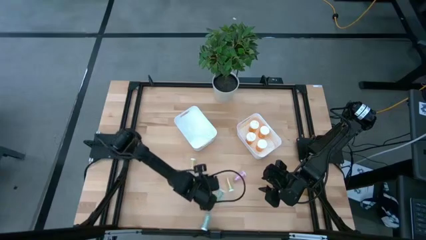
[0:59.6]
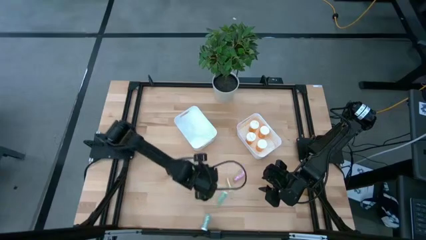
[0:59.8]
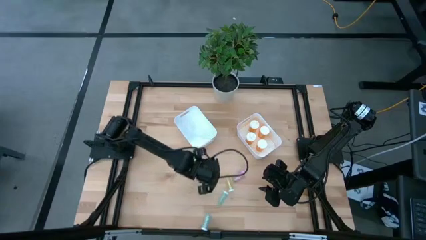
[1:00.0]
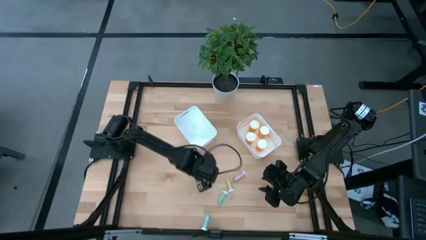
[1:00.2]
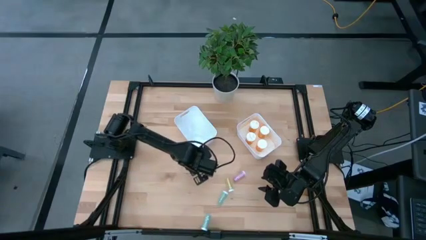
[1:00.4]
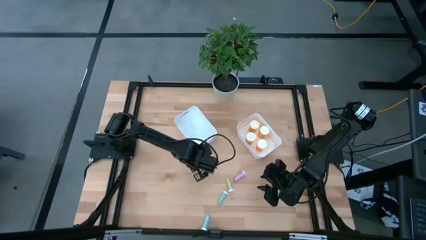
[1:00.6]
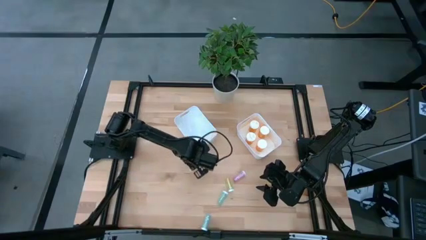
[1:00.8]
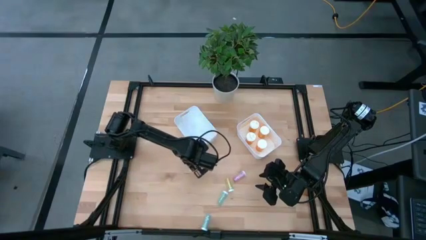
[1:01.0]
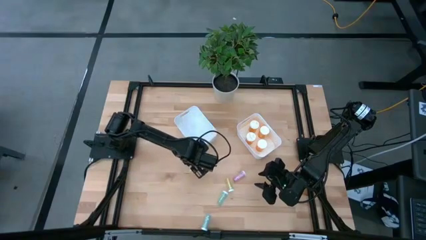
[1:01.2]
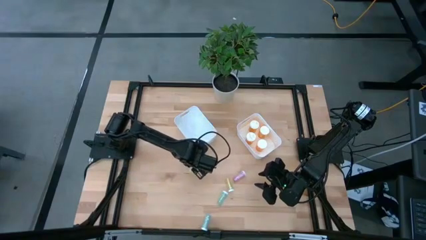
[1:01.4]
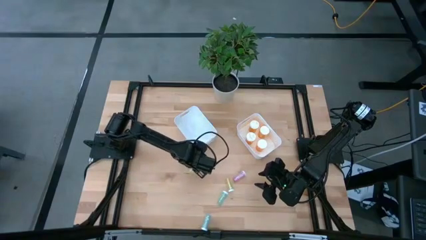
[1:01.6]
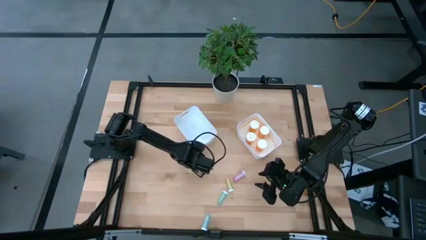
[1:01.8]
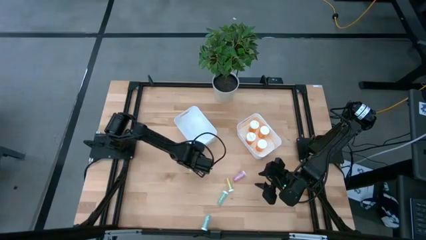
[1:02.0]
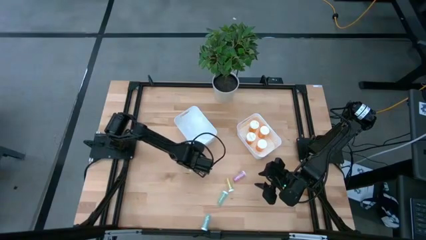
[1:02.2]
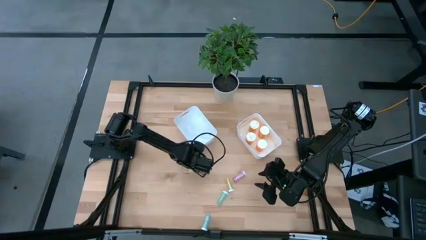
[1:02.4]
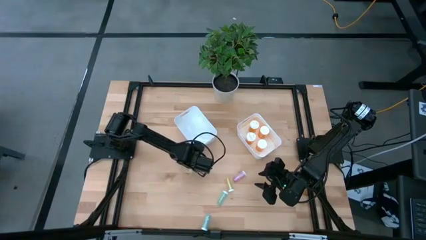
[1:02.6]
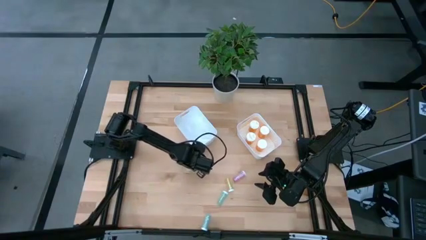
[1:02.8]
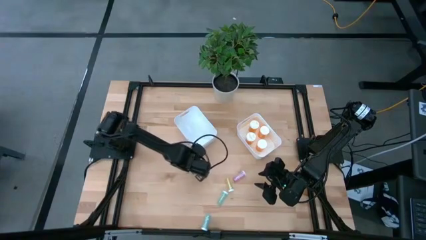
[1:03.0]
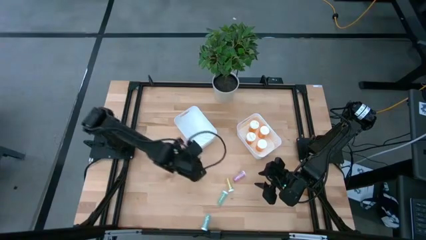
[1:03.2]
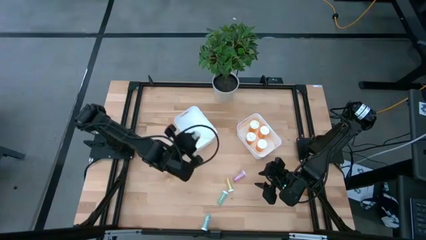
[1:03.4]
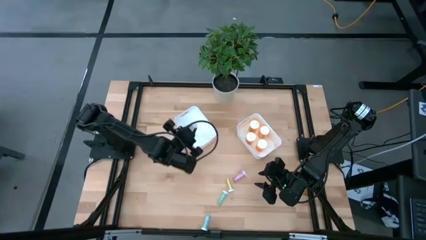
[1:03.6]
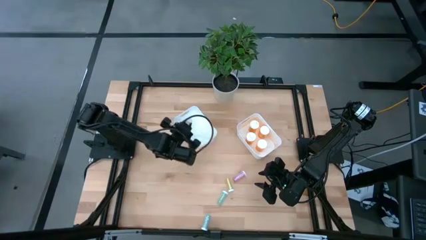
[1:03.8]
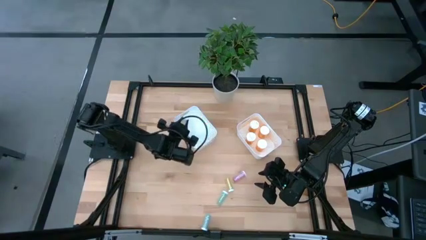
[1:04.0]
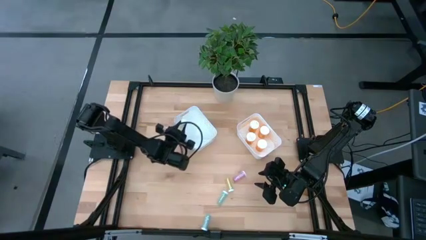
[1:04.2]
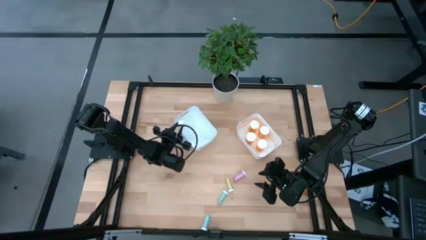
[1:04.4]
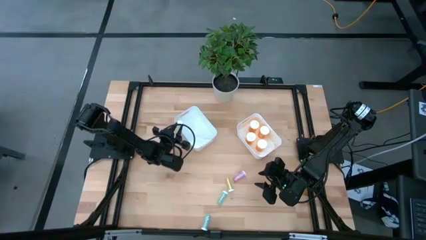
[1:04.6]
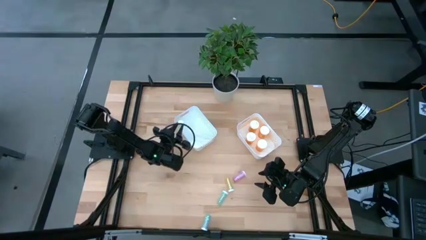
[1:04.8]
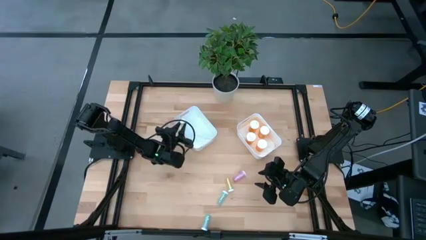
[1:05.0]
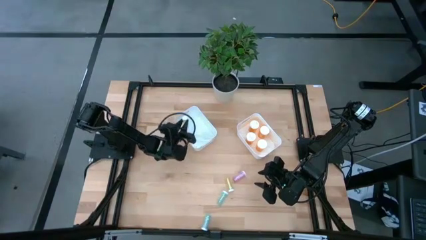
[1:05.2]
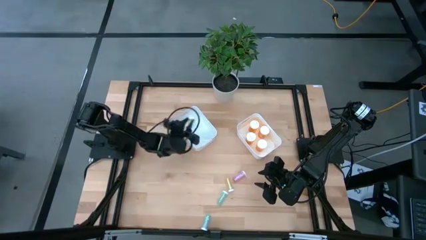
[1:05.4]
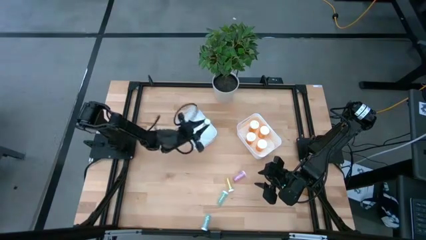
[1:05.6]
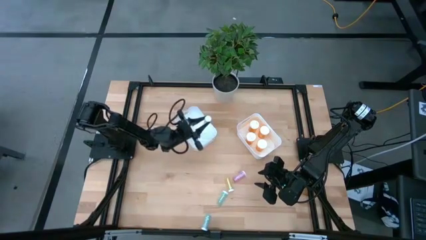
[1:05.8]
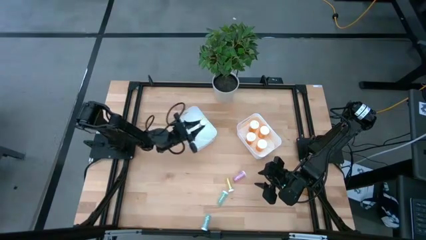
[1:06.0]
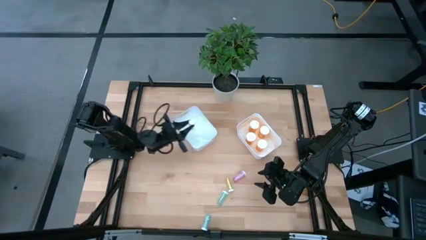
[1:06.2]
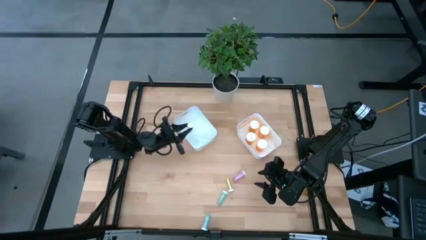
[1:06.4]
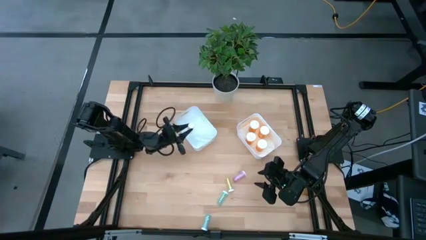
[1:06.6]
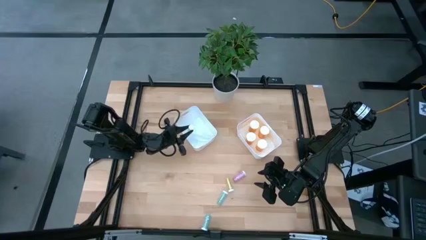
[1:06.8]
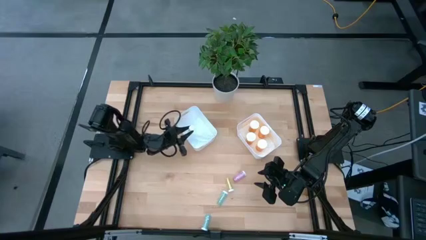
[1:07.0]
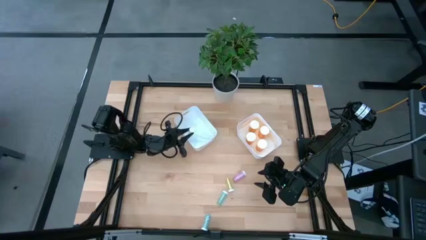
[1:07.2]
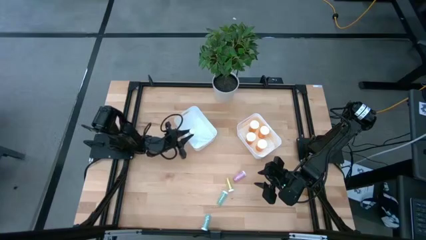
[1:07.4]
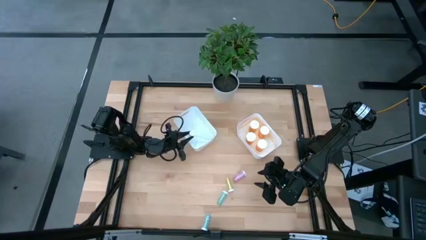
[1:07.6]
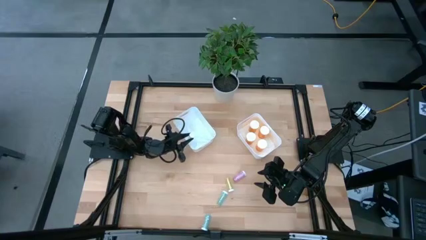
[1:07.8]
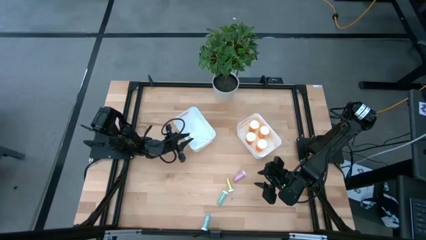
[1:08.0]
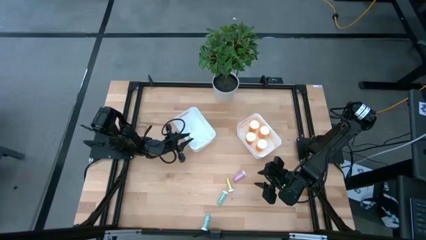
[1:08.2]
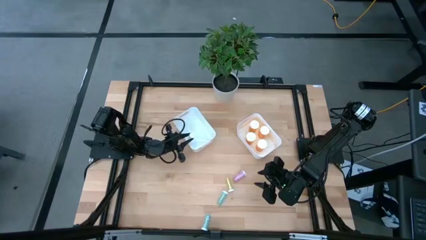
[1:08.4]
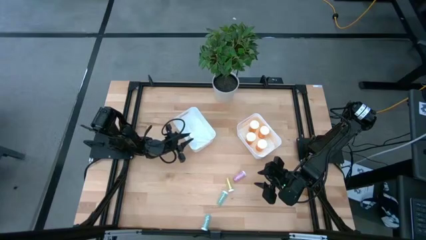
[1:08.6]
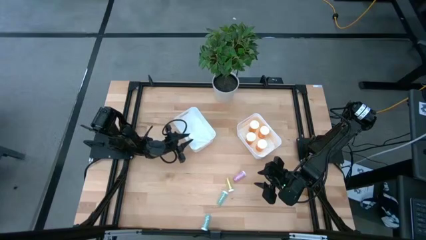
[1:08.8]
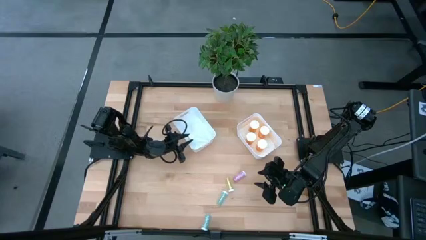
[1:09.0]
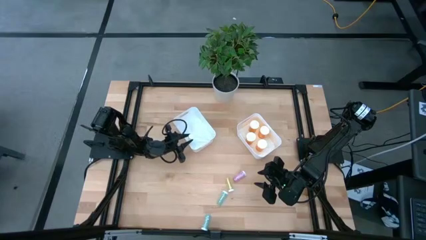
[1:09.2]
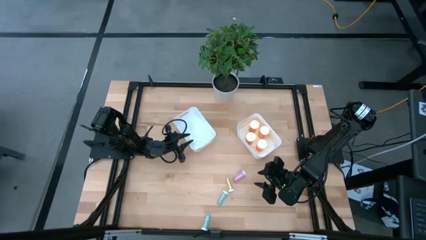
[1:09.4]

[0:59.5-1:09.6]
Task: Pick and place medicine bottles into bin by pill shape (circle, oval)
Put the left yellow pill bottle into the left white bin

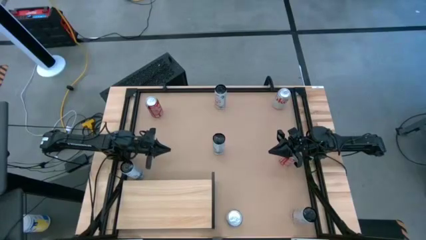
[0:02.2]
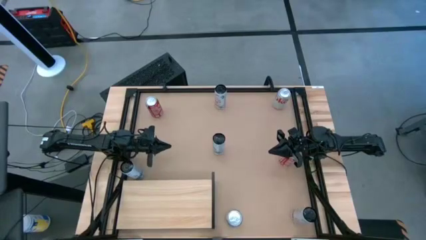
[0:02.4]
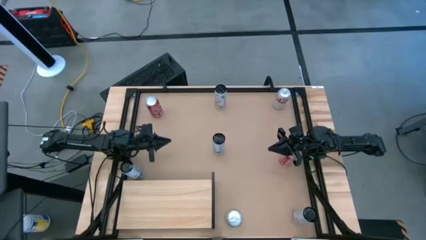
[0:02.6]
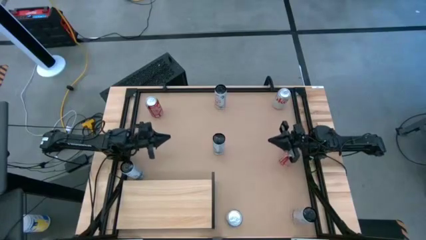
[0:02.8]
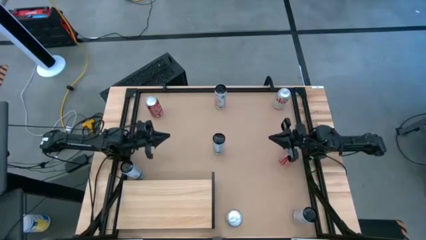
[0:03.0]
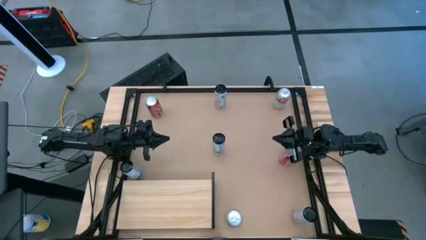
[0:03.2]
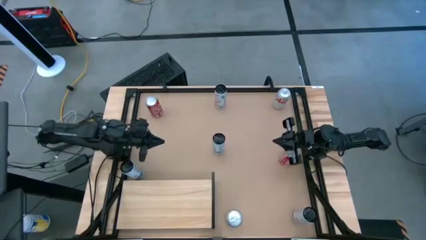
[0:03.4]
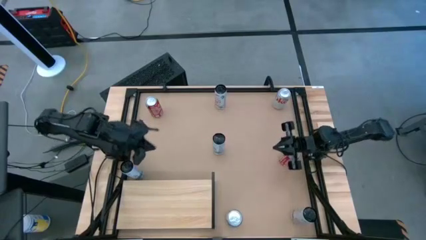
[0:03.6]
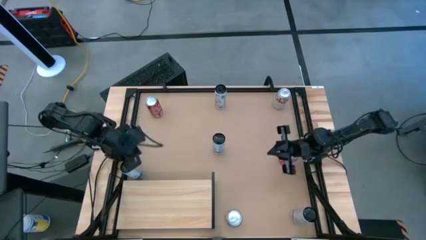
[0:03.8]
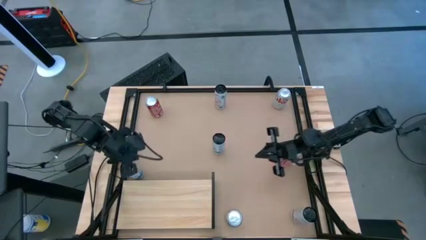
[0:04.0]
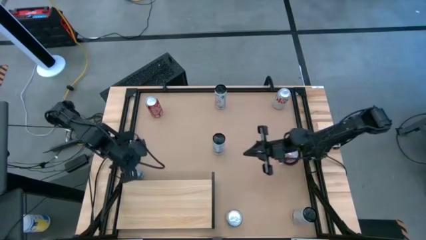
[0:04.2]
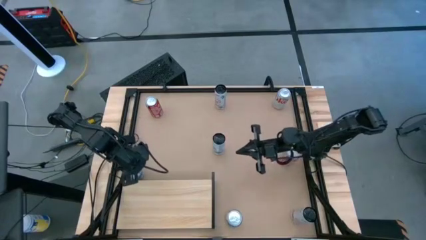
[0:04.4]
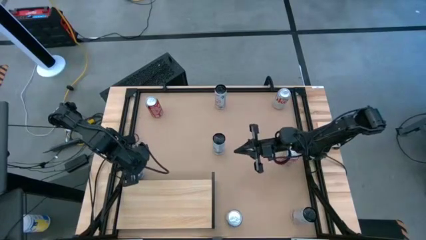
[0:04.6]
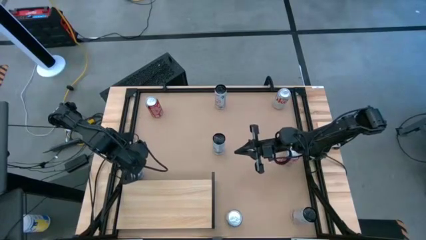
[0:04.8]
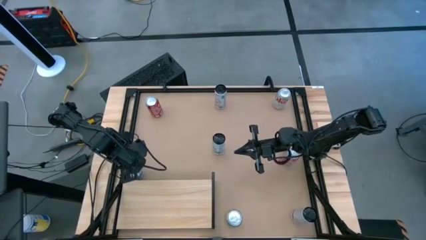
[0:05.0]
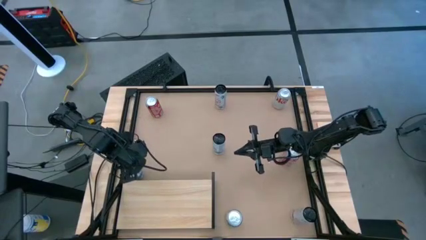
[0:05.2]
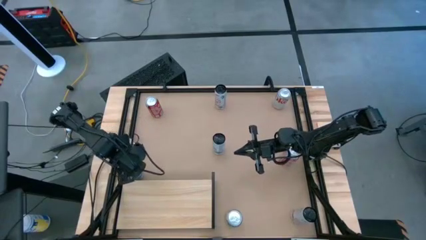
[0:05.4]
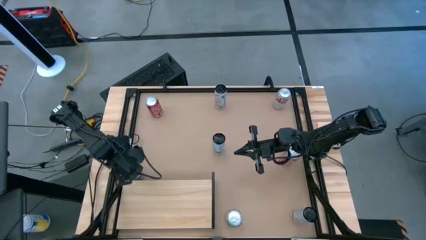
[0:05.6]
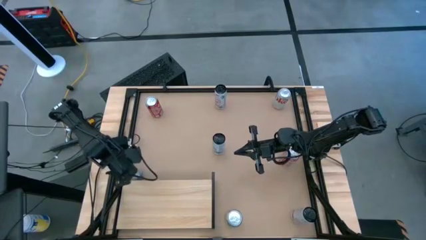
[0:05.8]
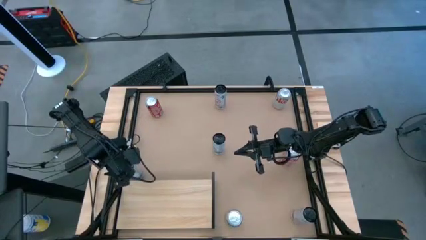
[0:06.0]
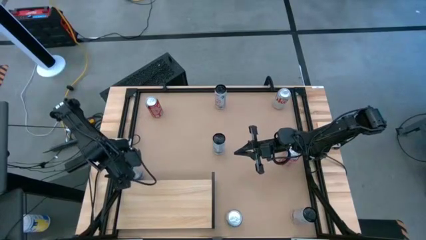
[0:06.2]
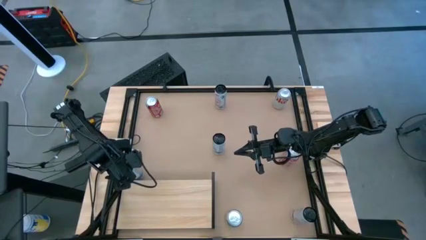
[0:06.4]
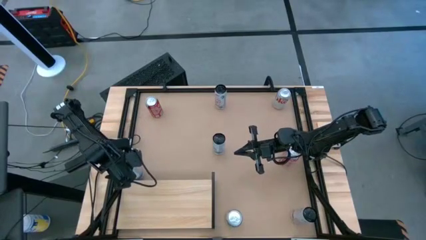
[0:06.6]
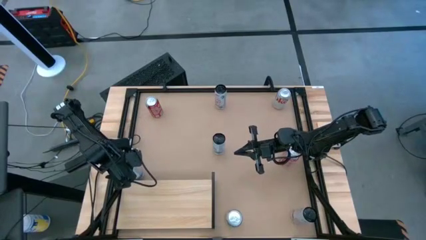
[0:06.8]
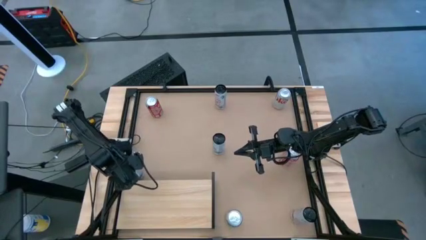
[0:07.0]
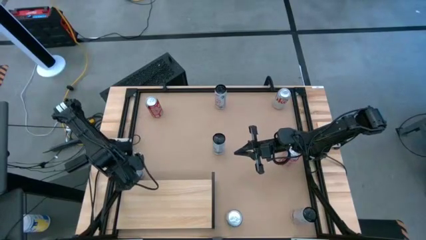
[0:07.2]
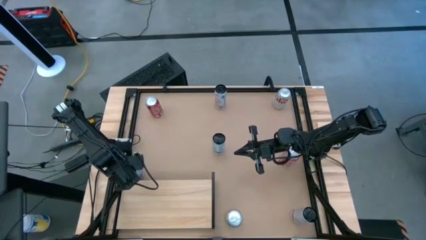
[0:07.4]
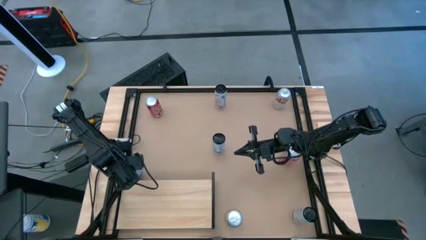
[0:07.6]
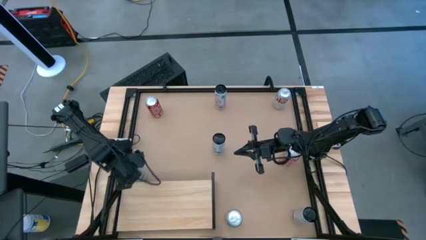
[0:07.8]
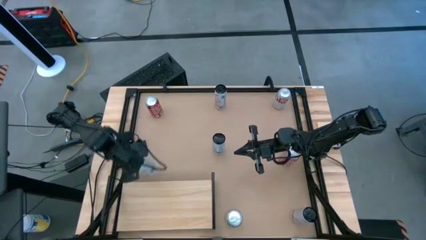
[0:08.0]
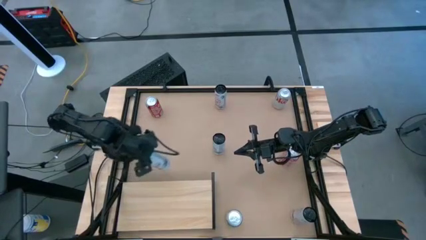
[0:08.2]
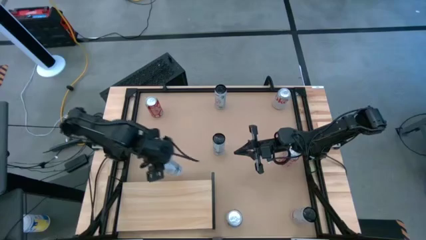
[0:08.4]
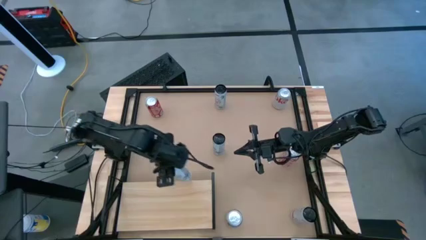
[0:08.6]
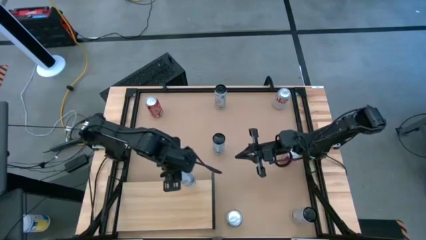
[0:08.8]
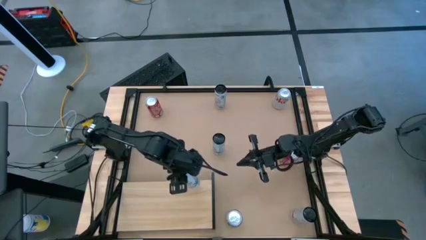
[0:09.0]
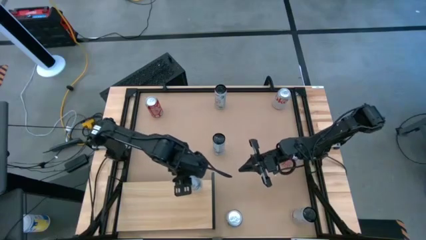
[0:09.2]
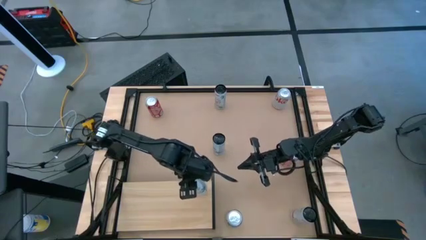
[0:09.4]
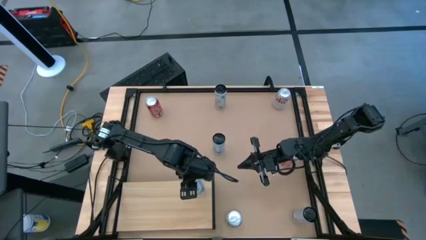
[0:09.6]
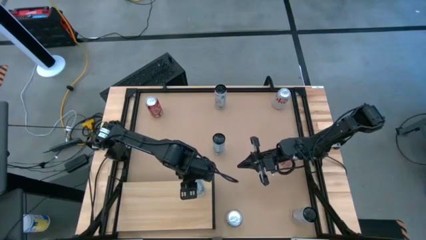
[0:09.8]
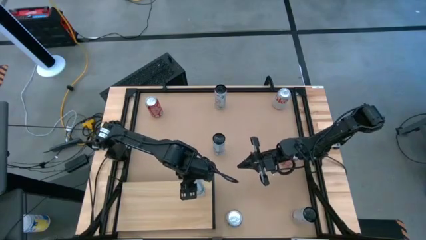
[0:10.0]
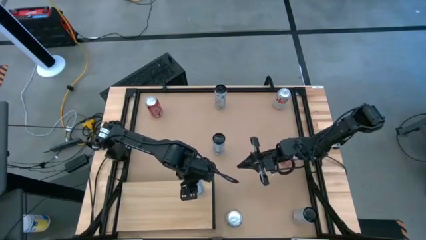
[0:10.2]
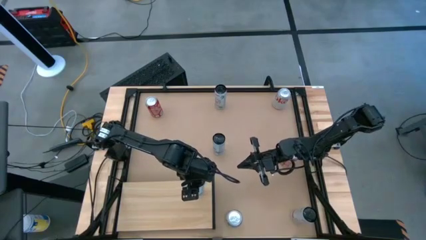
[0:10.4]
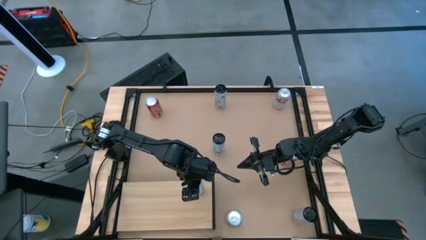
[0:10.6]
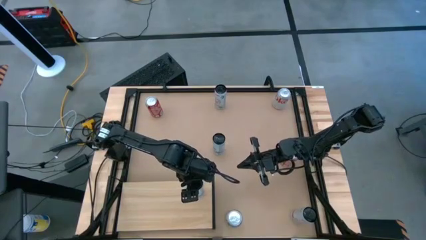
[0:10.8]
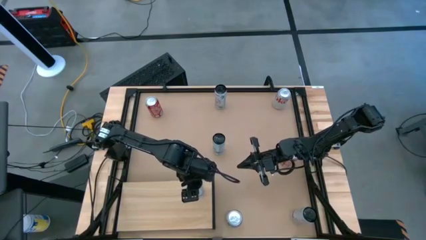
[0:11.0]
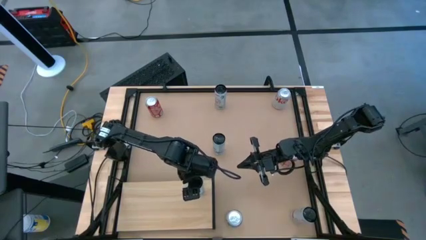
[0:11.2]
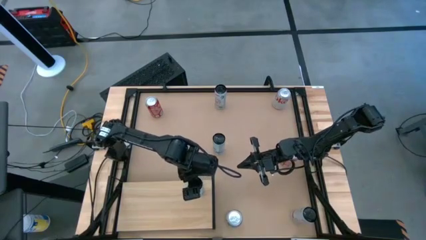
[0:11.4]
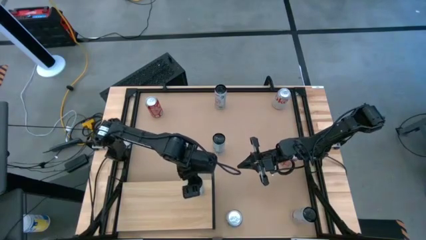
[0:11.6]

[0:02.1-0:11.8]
Task: Place canned beverage on shelf
Put the left white and blue soda can on the shelf
